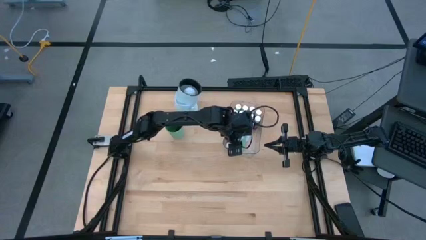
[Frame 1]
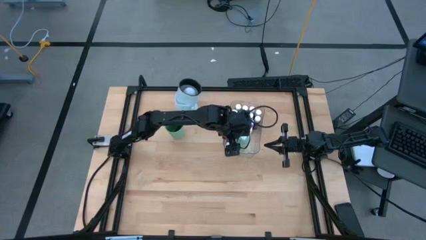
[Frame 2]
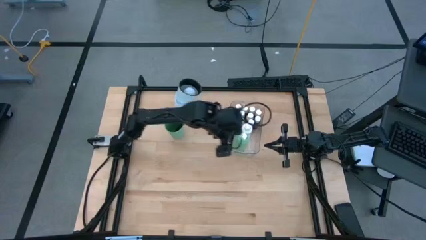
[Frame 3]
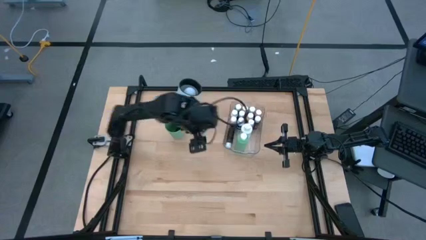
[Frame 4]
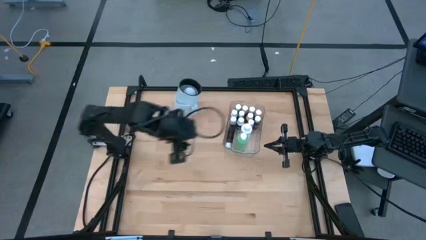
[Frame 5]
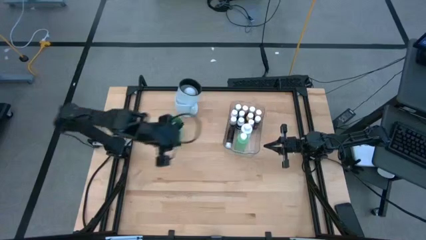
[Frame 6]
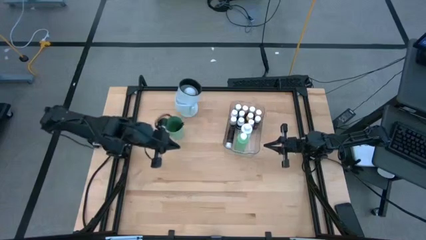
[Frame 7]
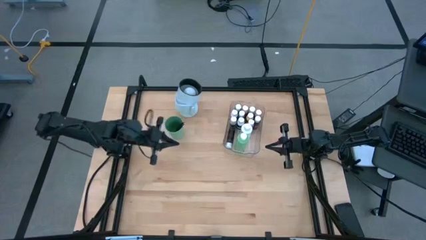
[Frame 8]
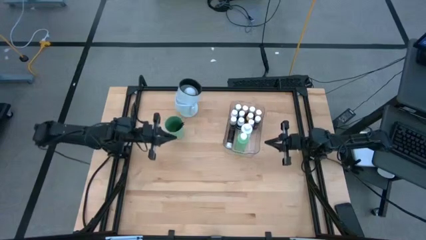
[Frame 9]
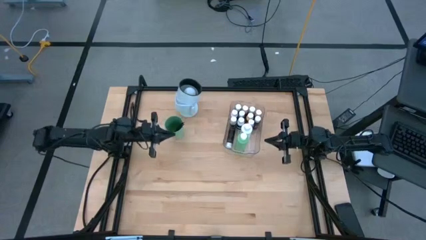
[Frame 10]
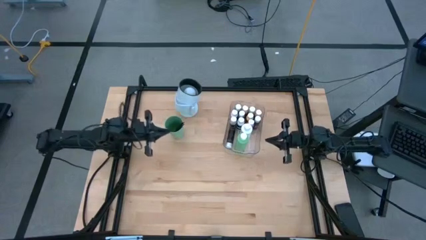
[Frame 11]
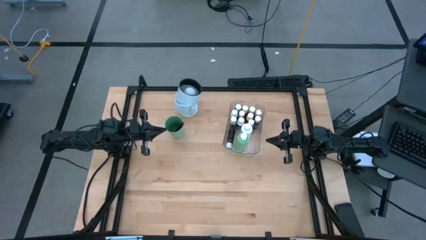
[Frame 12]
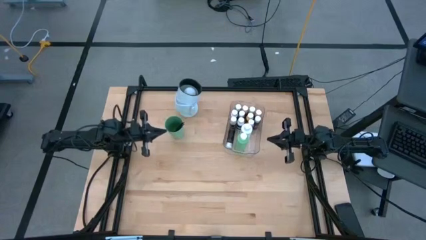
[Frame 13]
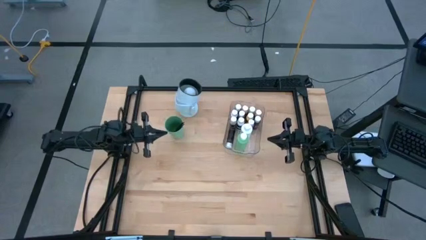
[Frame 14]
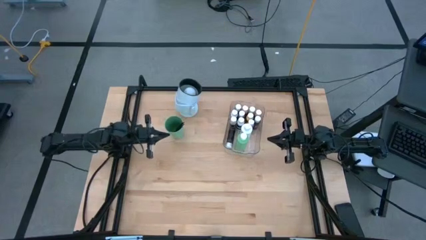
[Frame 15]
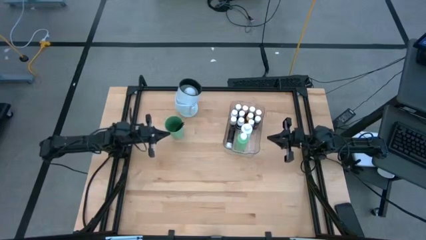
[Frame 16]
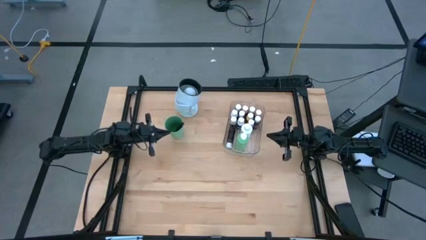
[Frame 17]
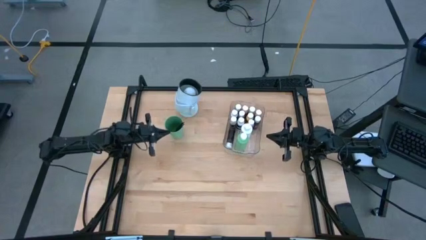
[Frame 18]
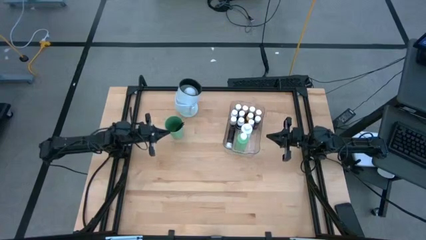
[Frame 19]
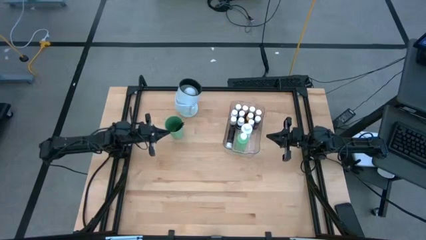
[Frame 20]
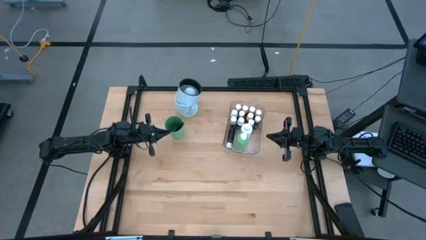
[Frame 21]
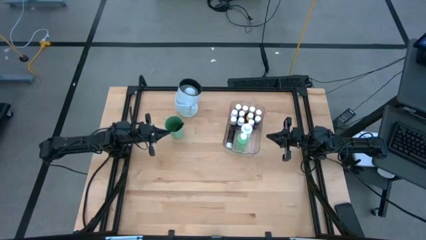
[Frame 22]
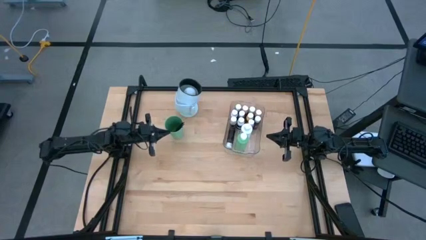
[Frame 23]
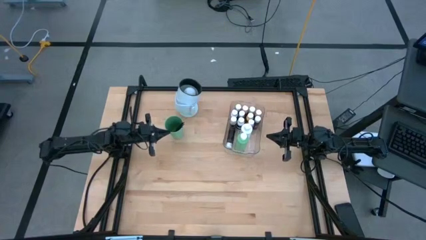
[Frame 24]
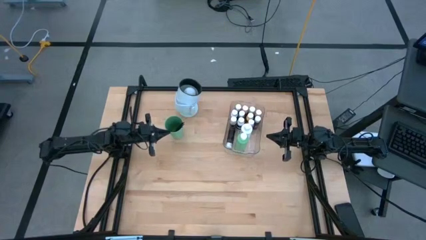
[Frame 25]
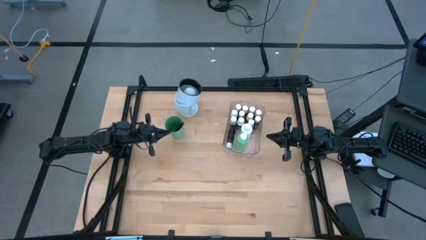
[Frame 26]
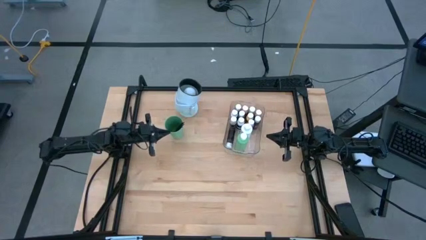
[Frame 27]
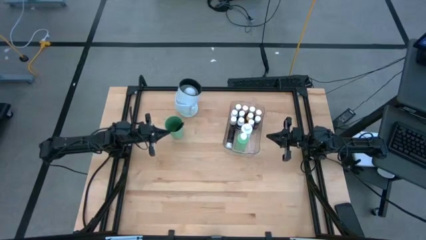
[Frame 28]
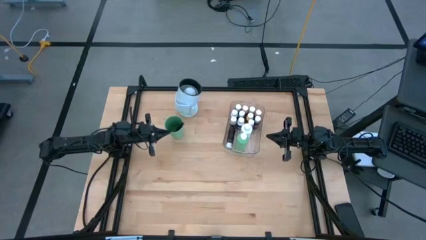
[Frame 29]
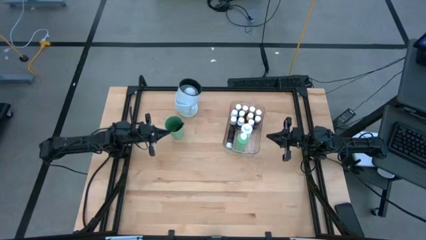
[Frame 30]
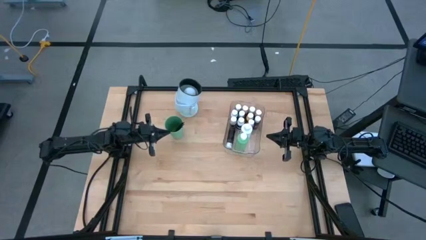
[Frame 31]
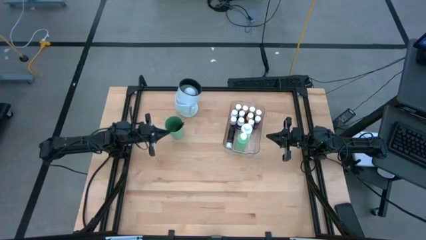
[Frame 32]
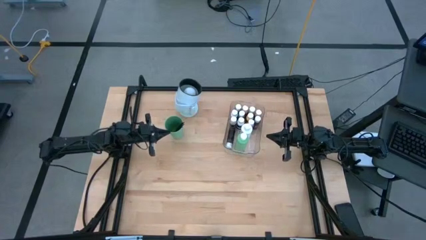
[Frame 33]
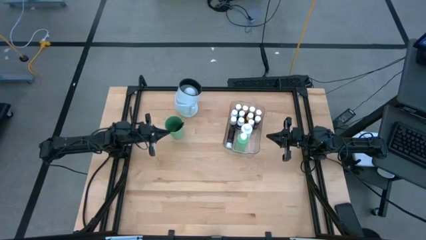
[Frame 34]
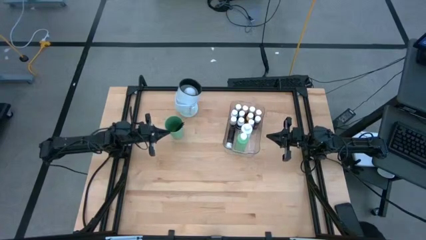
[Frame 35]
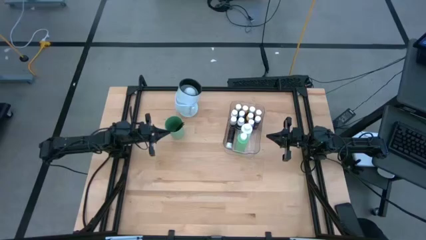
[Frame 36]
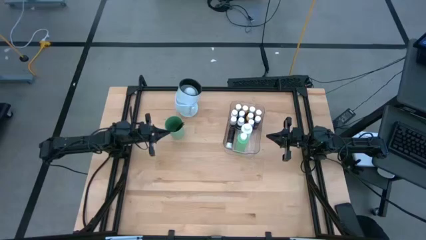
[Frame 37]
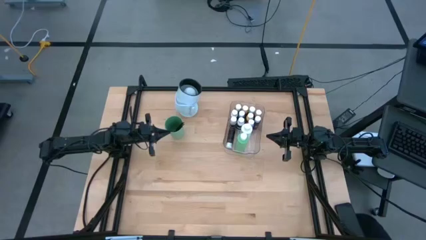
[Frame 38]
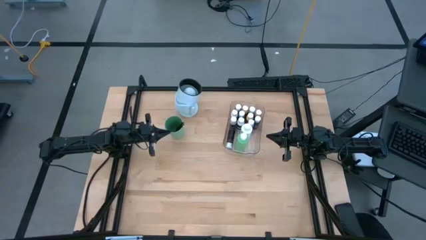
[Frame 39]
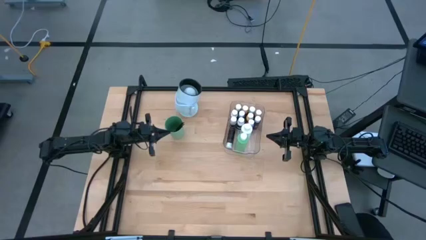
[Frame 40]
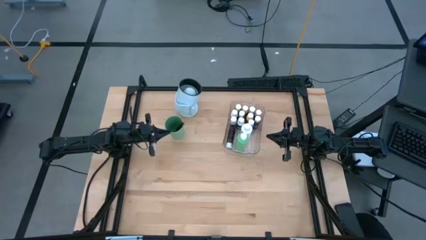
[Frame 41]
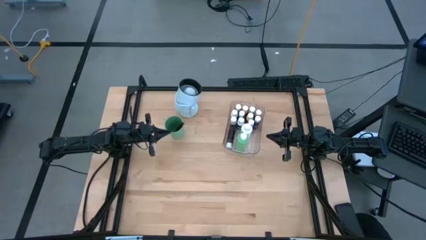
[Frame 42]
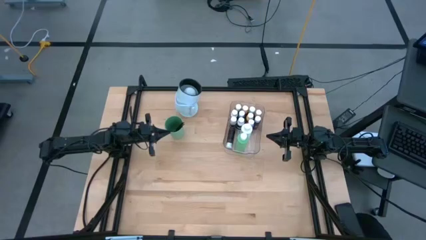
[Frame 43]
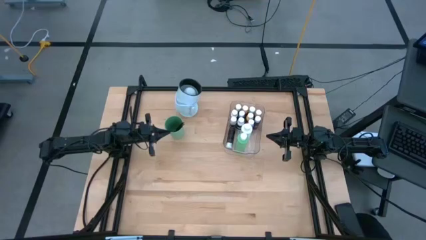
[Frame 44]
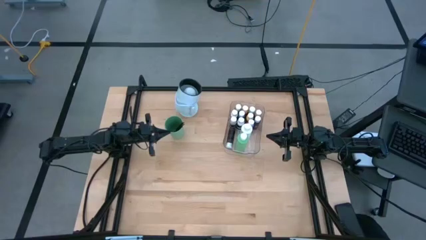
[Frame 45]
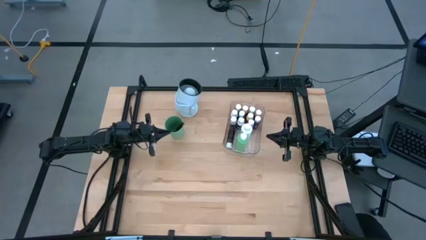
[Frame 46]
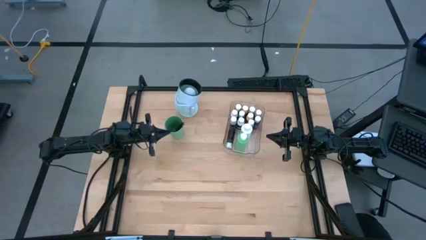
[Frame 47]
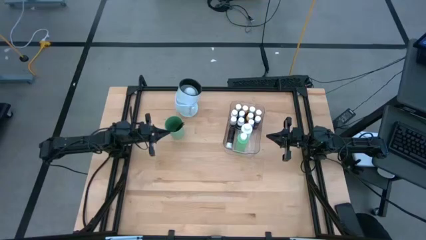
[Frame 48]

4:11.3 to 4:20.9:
Task: Pick & Place Paint Supplies
Return to Home Position
